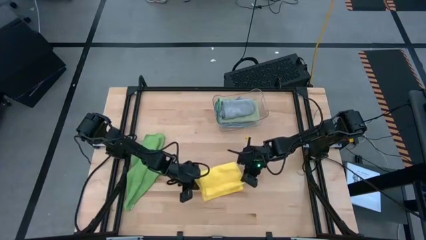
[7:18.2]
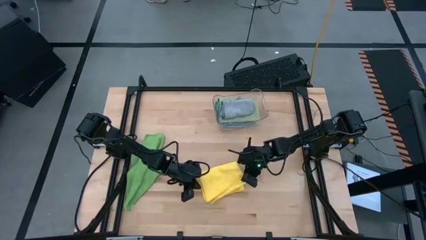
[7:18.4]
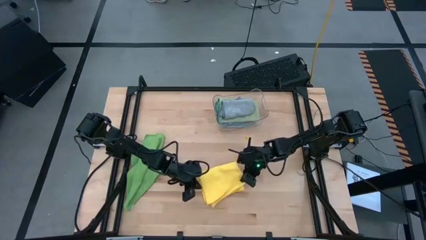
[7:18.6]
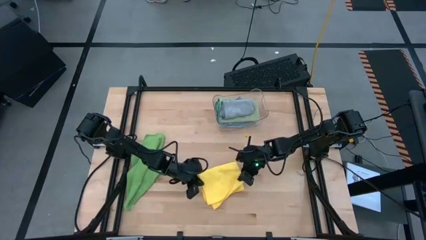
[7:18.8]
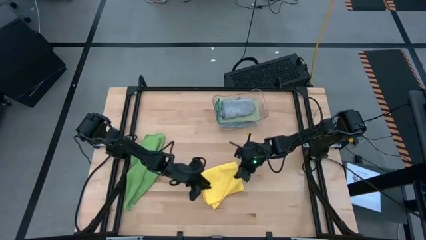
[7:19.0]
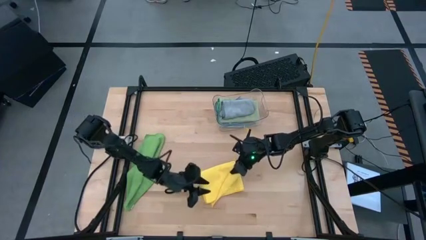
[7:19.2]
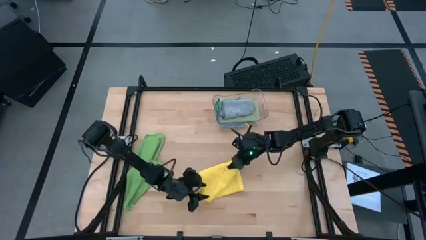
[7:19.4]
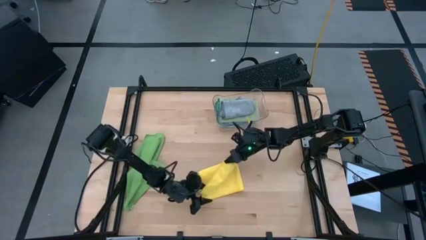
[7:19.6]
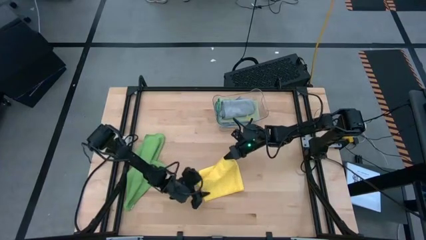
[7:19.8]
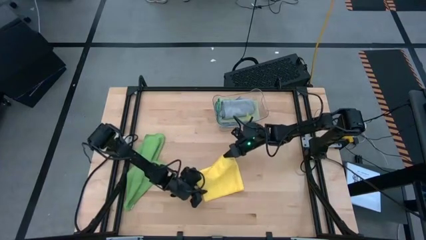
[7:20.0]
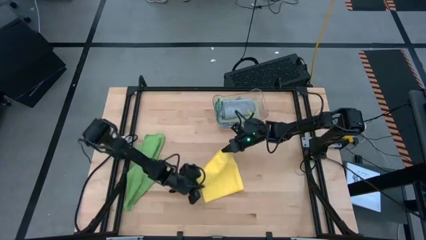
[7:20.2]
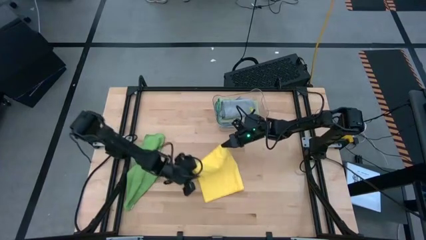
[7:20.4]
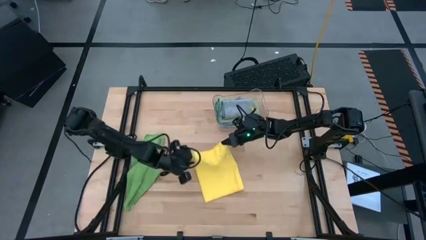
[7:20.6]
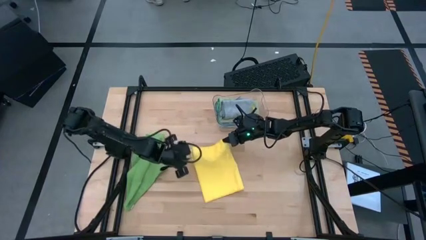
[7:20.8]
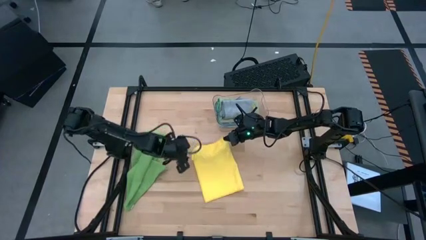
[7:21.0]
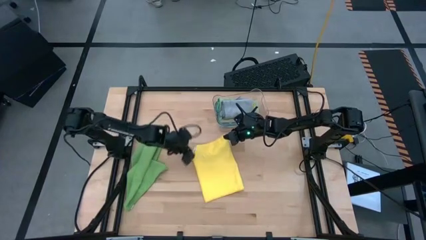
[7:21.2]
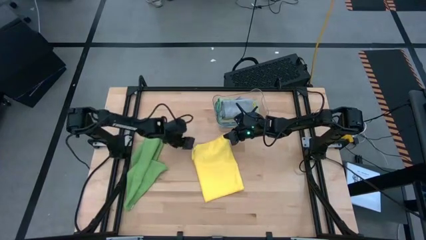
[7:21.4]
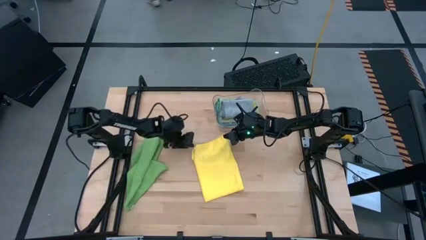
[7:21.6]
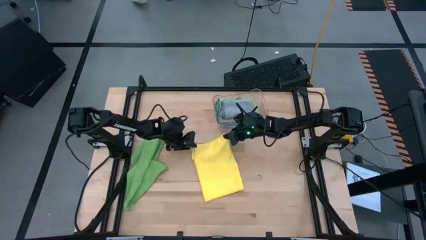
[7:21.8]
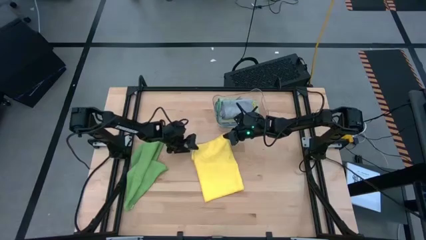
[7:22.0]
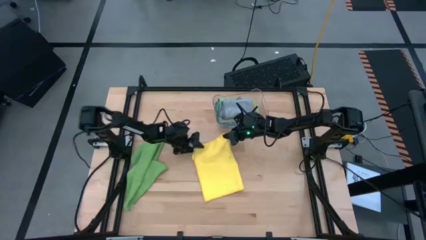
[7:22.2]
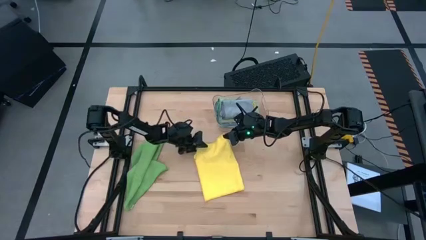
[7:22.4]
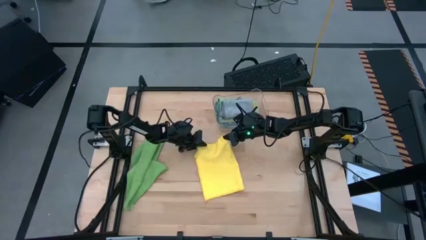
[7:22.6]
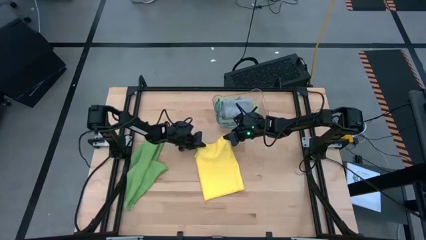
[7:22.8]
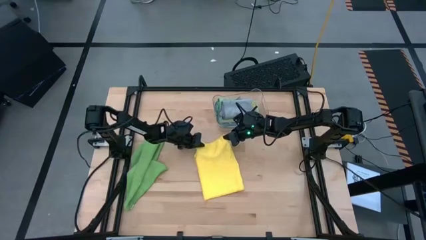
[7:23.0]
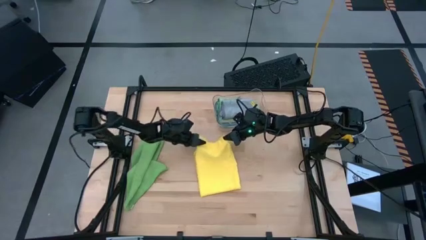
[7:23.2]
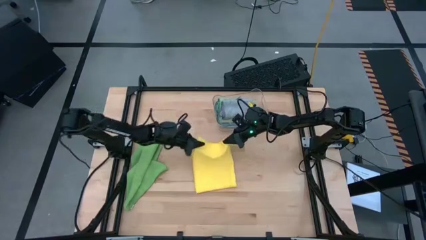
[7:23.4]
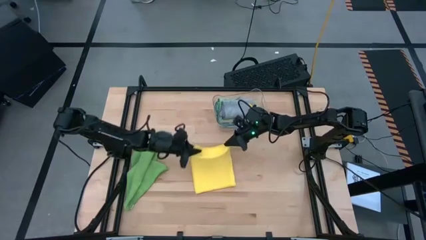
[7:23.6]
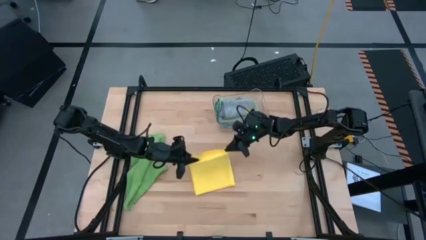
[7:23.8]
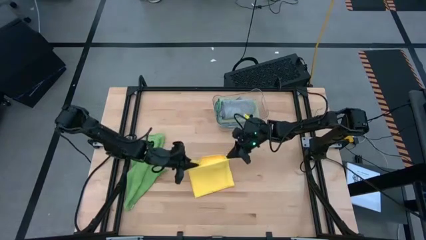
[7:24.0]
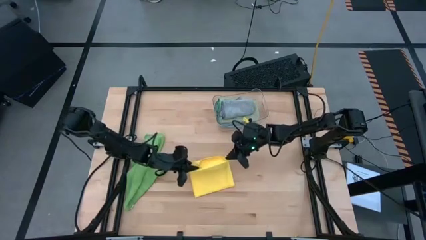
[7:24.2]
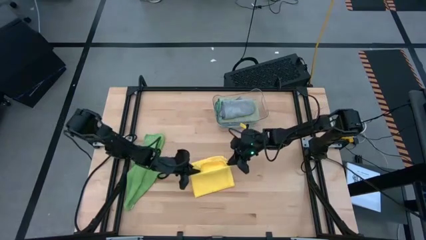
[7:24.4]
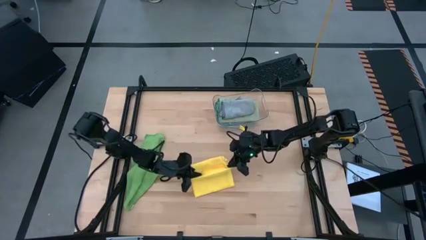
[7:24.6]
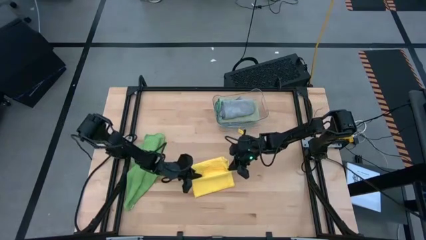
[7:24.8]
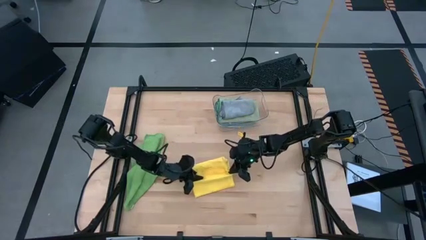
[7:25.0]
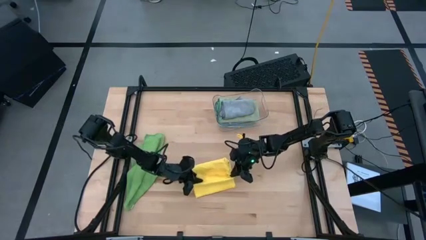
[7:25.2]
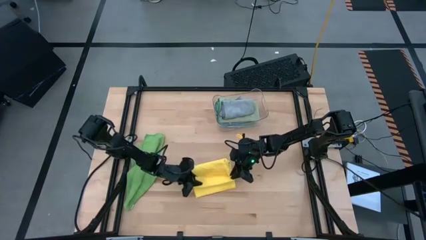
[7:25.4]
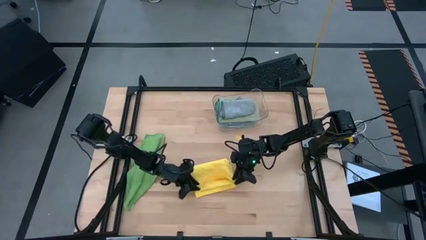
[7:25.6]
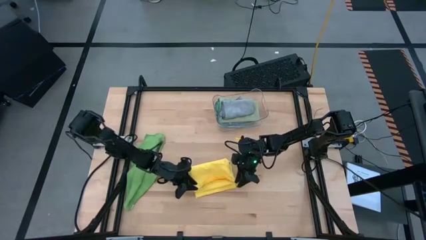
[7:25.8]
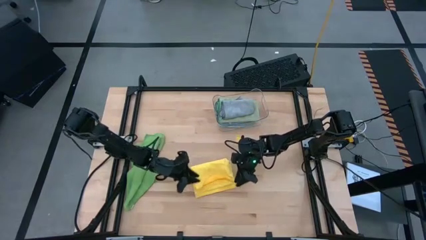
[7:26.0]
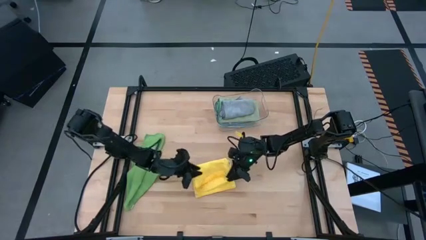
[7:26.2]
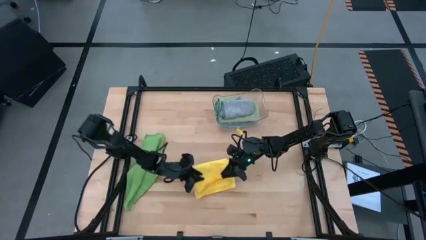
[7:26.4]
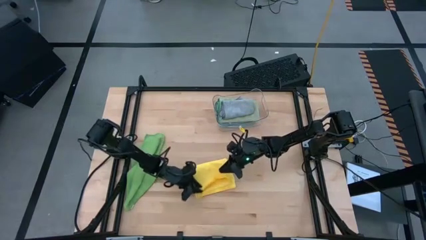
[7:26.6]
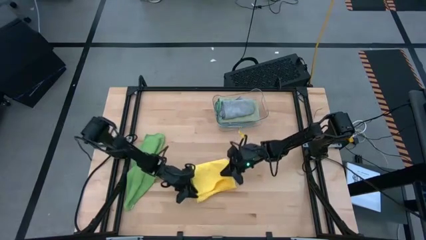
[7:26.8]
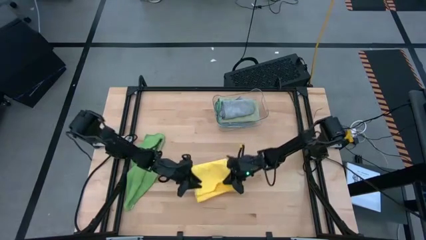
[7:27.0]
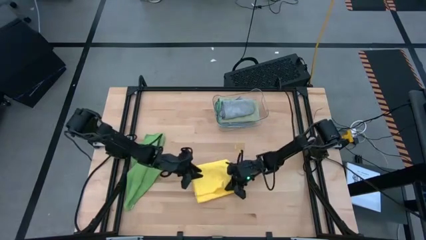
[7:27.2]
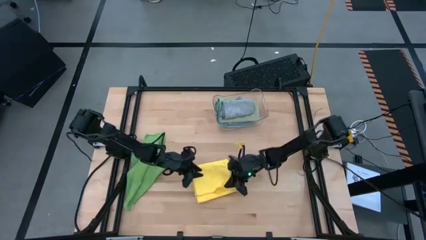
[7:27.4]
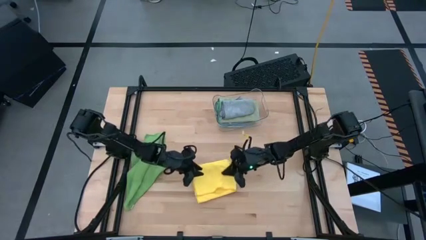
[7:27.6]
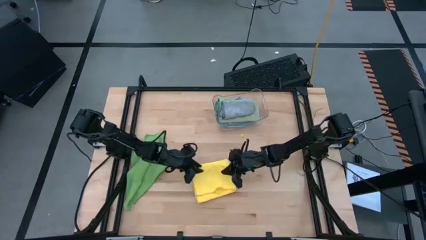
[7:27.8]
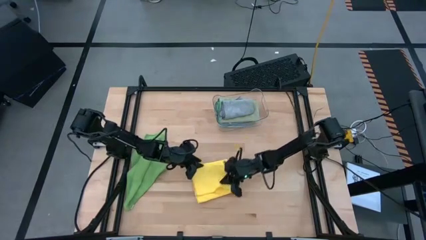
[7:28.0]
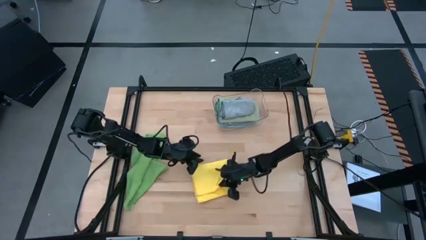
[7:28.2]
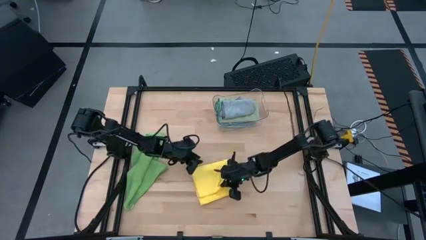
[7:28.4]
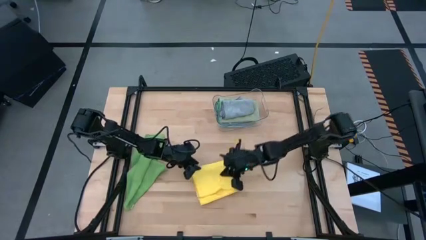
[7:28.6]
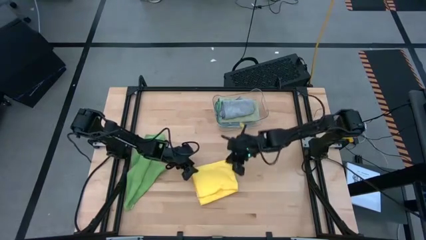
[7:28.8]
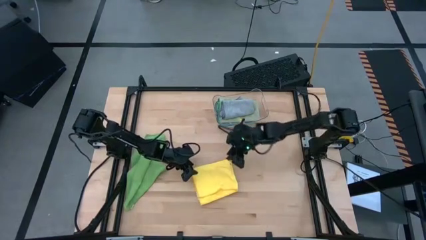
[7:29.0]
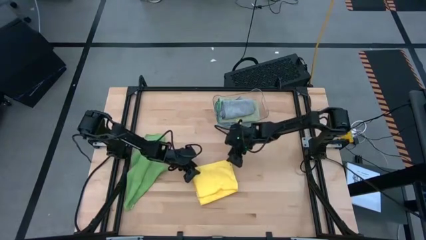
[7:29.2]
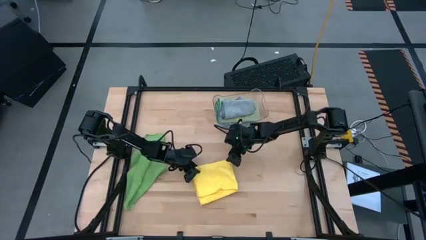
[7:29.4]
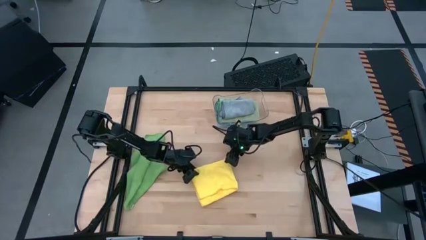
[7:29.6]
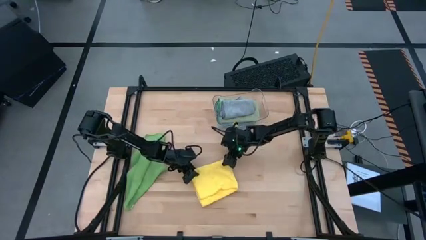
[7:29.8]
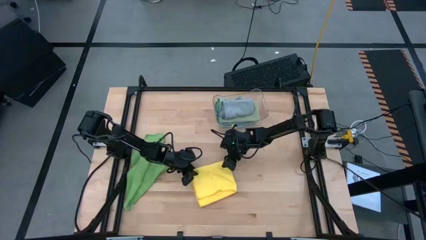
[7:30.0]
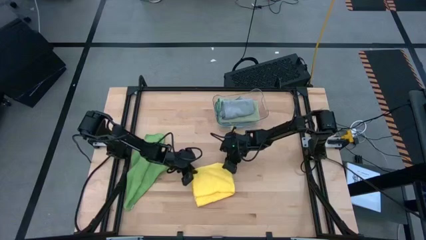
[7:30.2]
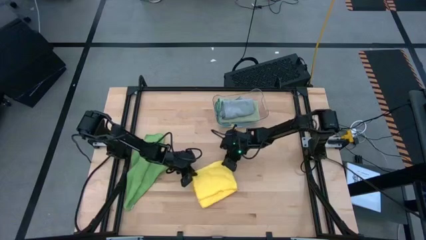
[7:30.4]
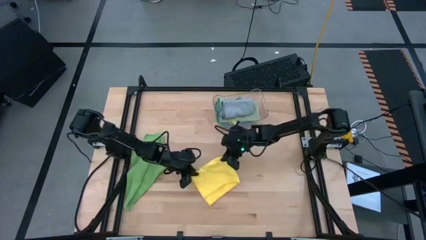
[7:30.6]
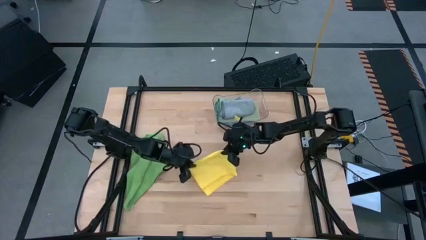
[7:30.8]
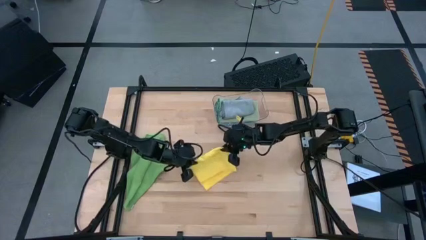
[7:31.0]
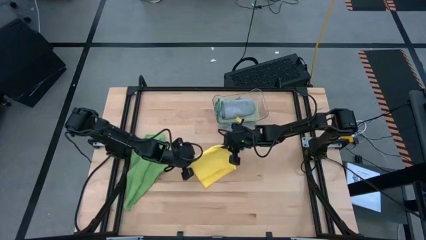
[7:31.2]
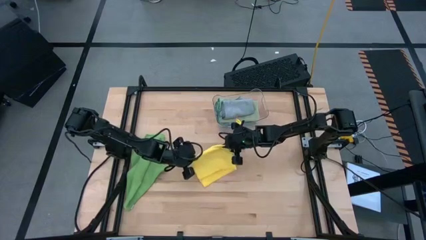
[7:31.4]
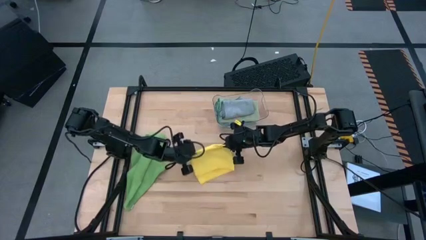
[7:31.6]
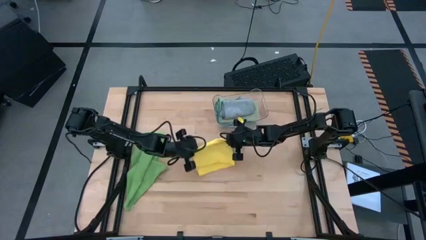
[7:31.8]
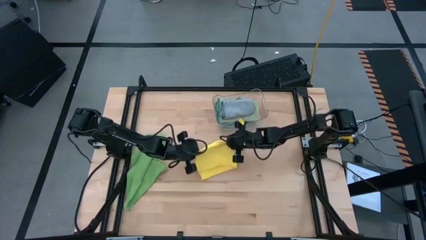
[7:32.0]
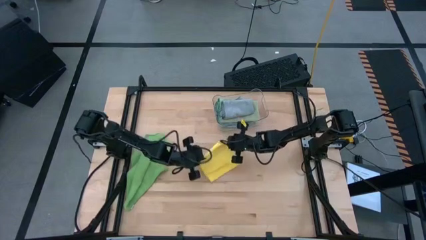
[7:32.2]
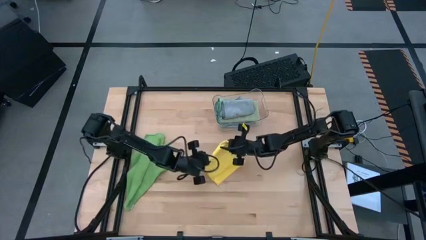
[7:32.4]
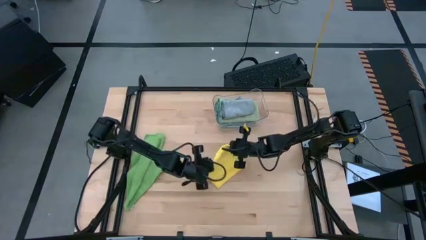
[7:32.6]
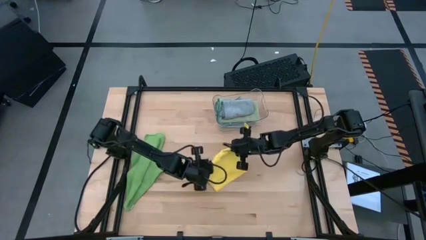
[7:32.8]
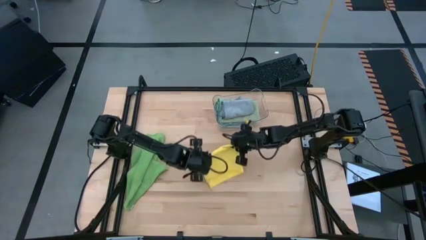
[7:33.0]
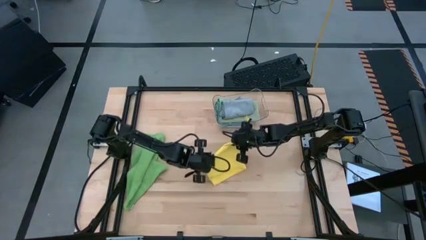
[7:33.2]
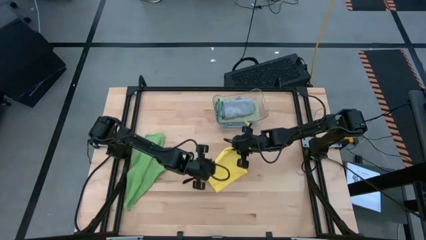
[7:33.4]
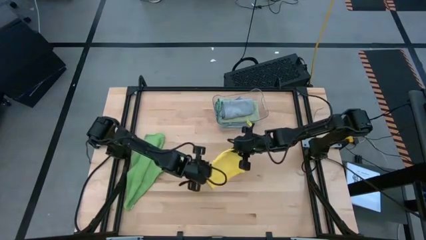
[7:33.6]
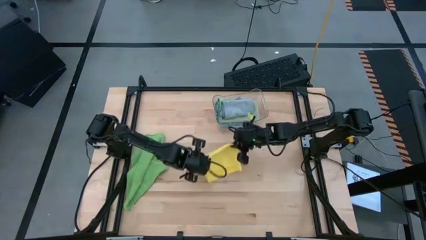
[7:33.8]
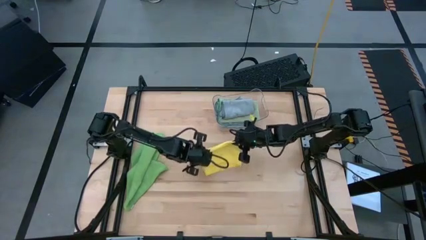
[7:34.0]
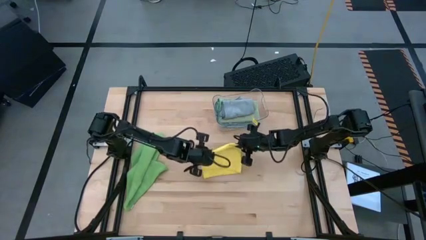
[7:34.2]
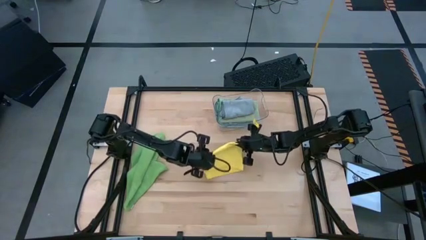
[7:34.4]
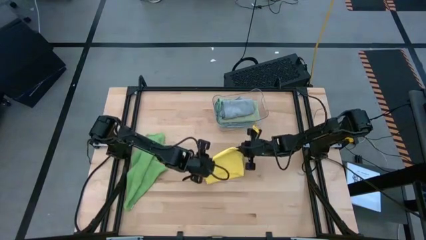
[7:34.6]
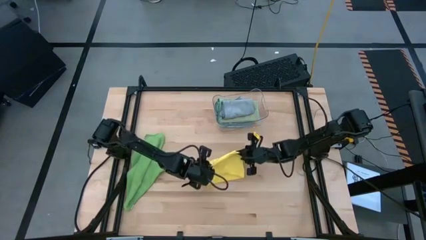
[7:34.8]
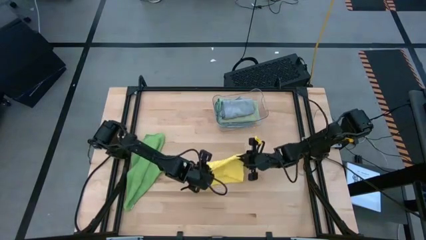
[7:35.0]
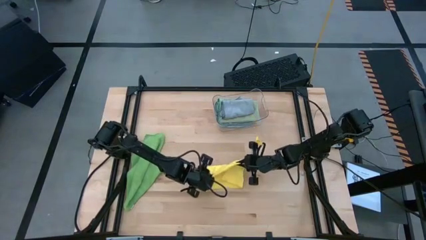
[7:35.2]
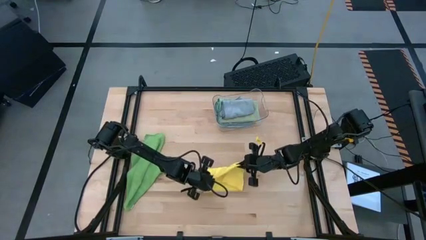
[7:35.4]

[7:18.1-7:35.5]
Task: Fold microfiber towels
Fold the yellow towel
